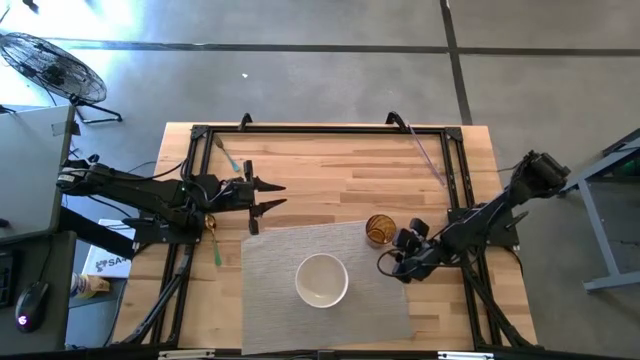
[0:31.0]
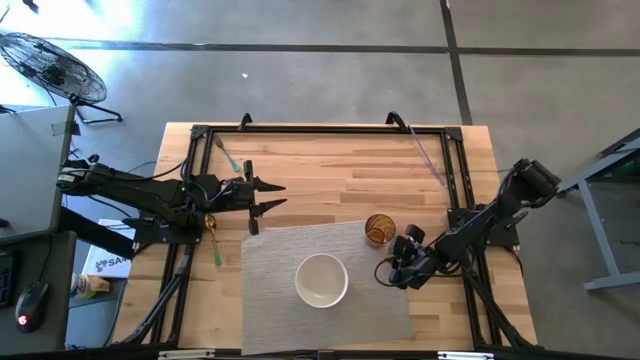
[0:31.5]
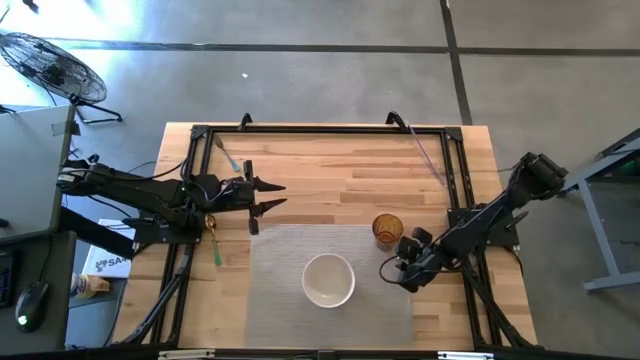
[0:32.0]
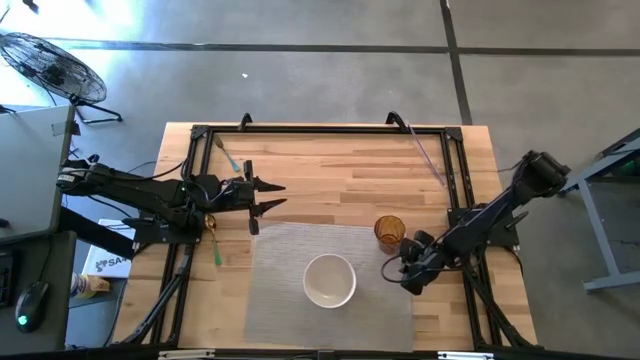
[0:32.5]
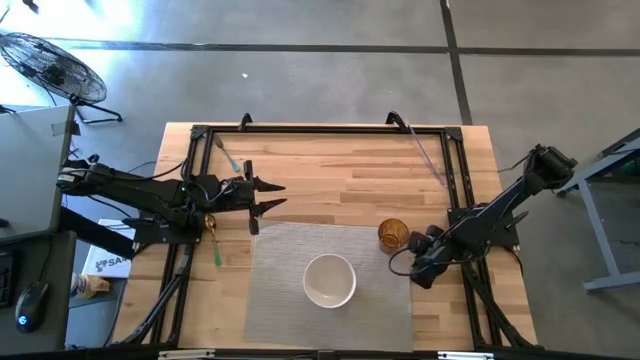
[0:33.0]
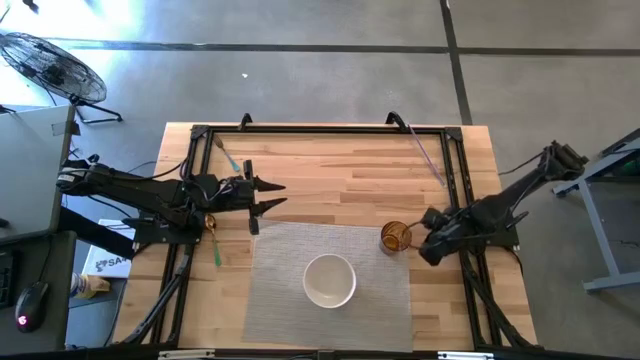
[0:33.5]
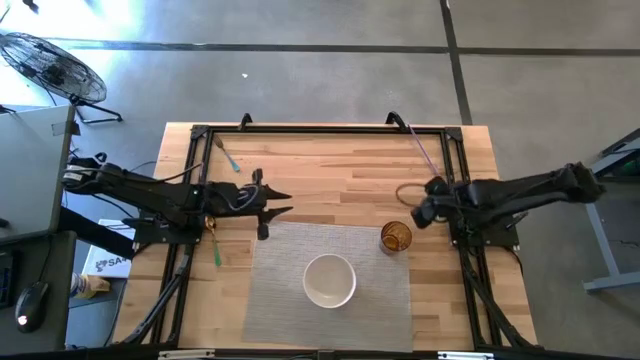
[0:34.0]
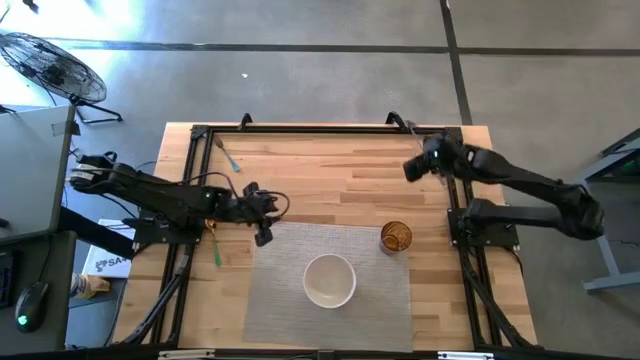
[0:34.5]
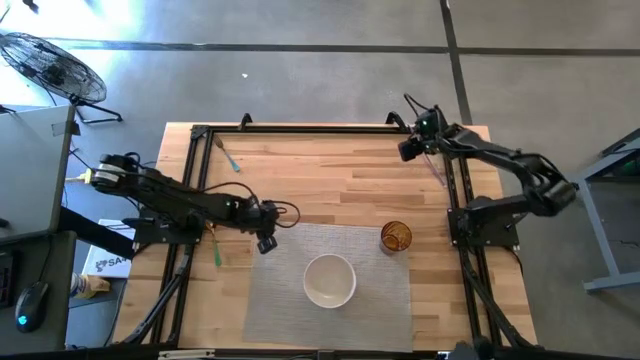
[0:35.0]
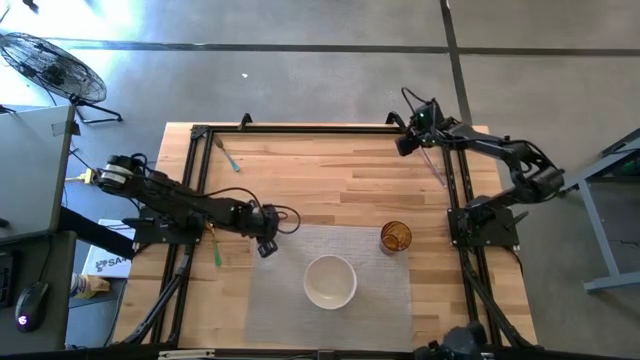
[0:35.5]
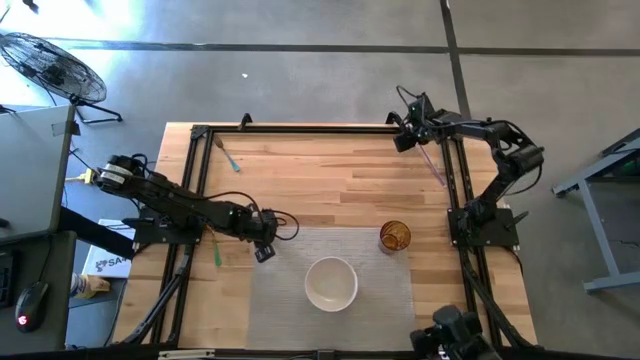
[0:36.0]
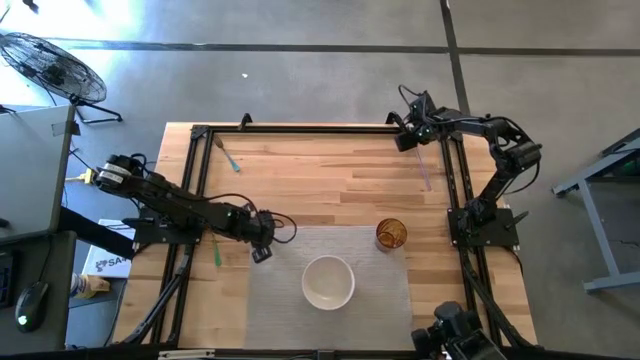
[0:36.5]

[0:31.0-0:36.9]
Task: Pick & Place Utensil
Adjust the gray mat

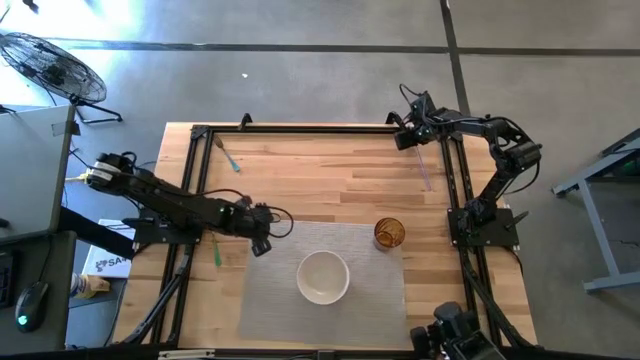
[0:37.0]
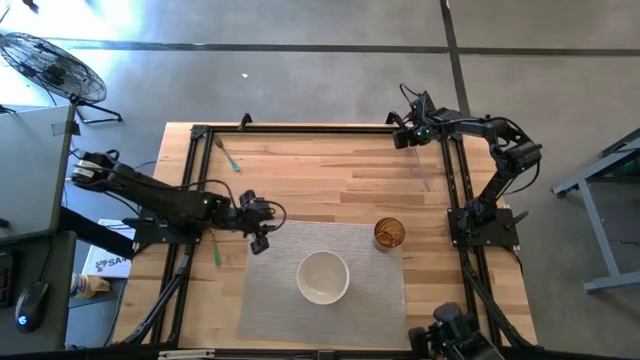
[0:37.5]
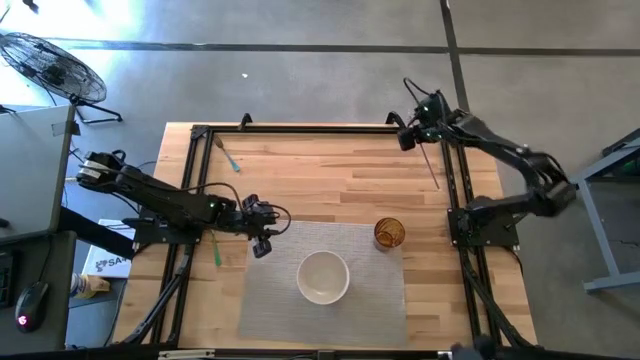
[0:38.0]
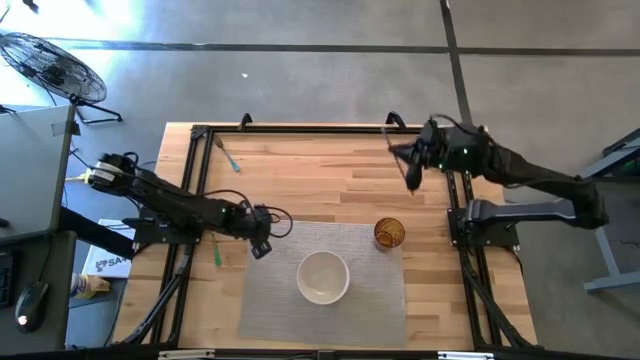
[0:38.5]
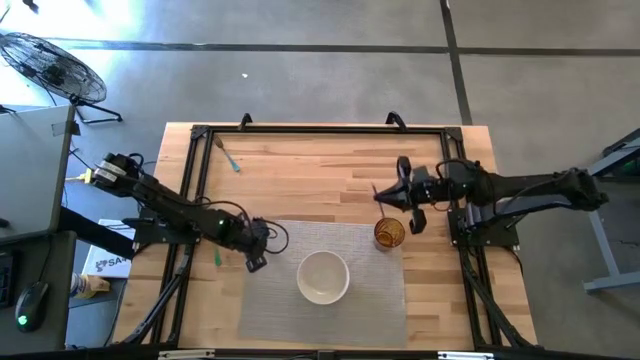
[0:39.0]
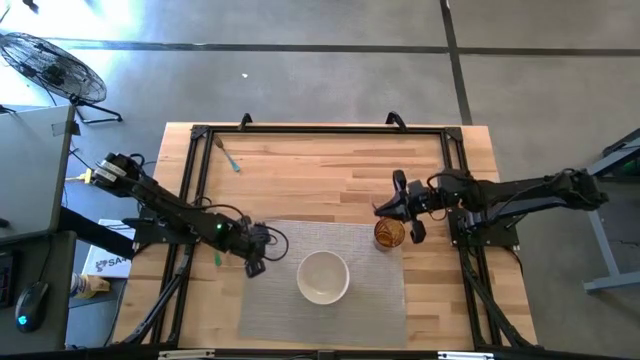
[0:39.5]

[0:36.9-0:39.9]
Put the purple straw into the brown cup on the gray mat

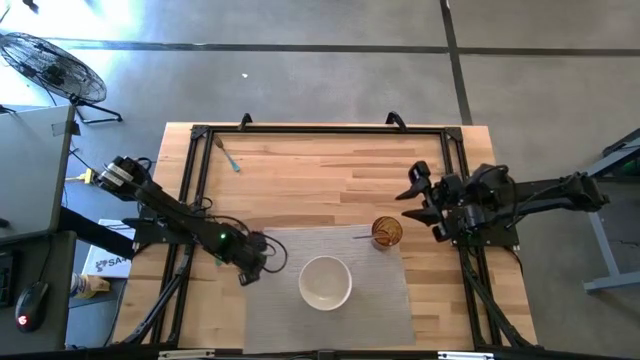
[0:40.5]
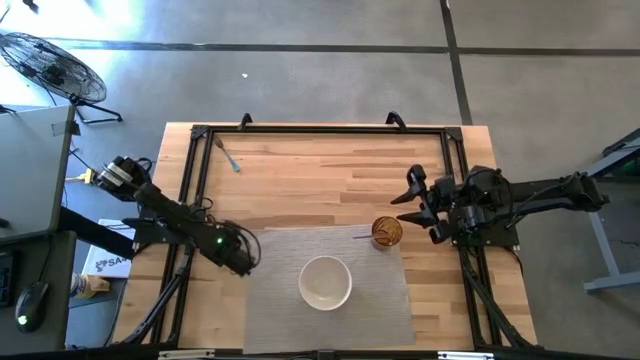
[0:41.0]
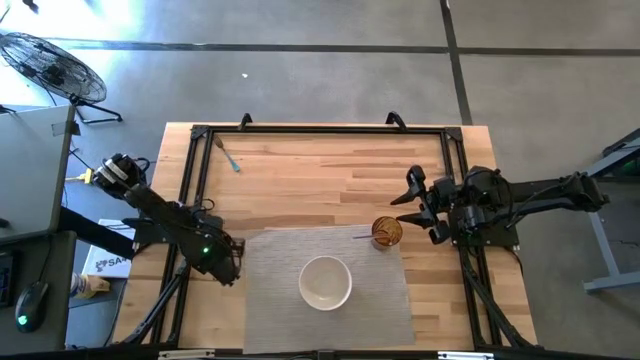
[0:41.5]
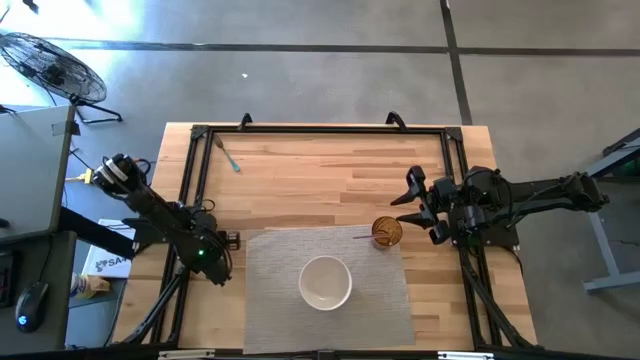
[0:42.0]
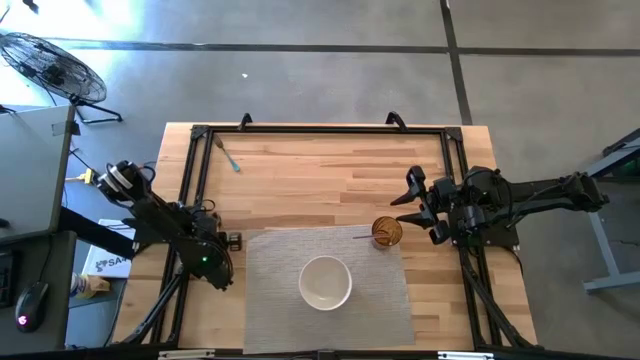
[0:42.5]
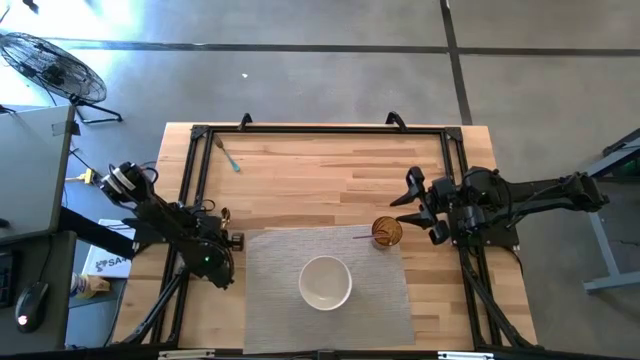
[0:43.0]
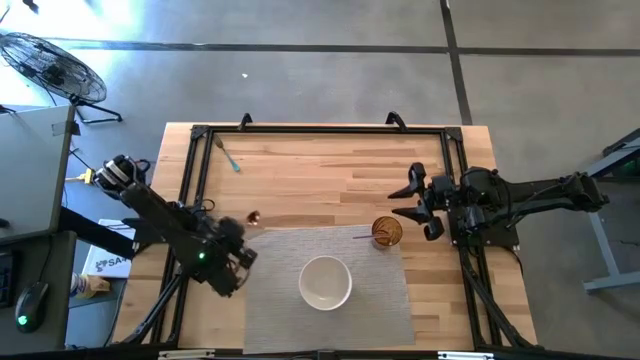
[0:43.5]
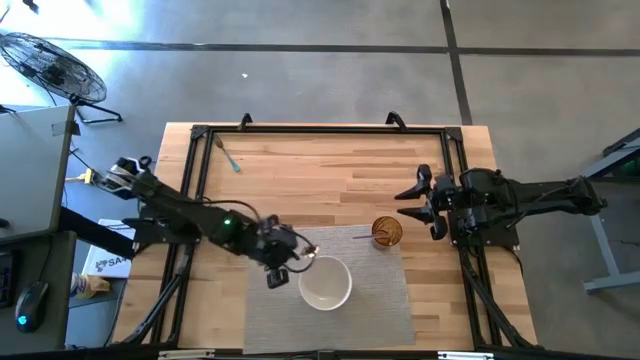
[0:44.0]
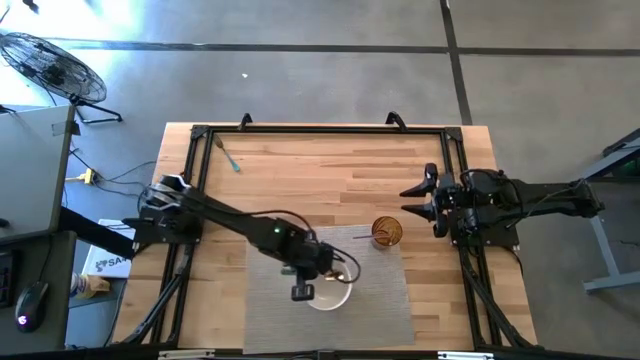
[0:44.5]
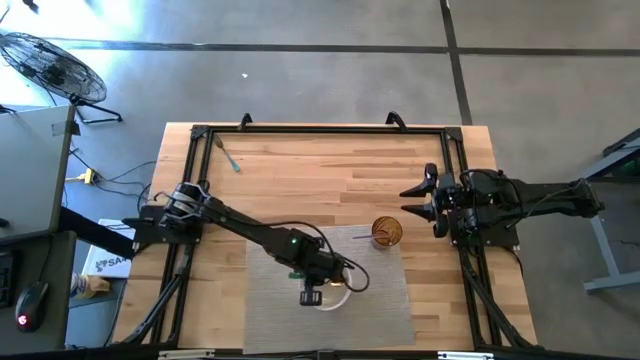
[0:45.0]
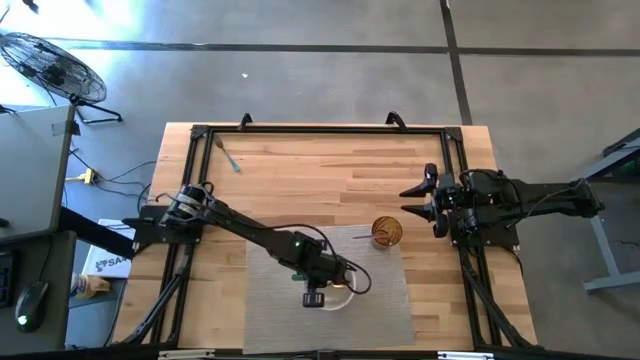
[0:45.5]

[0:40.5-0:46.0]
Put the green spoon into the white bowl on the gray mat

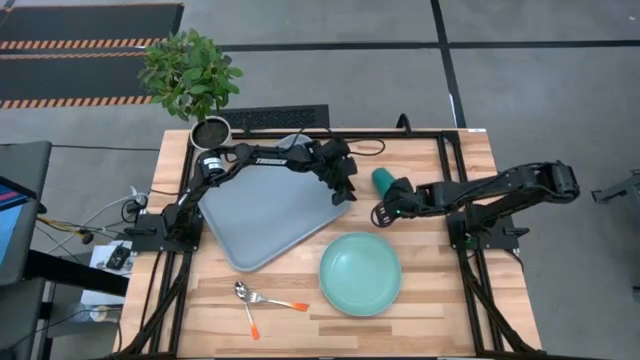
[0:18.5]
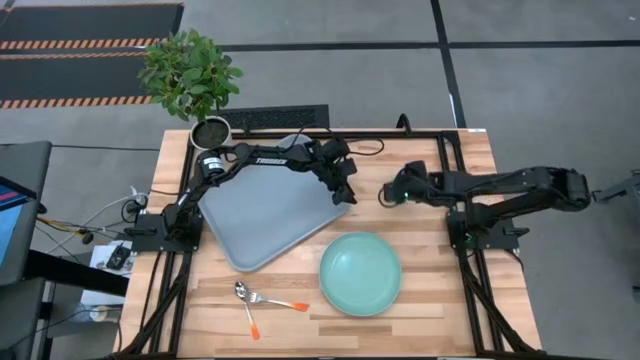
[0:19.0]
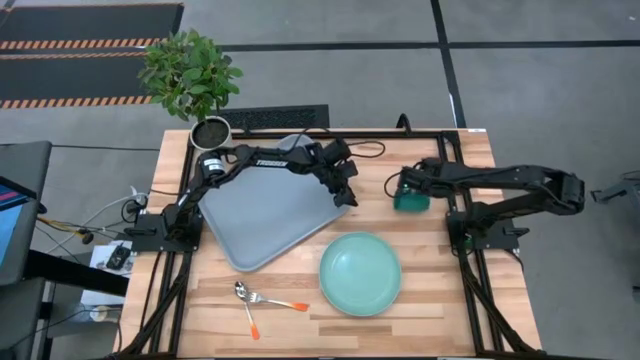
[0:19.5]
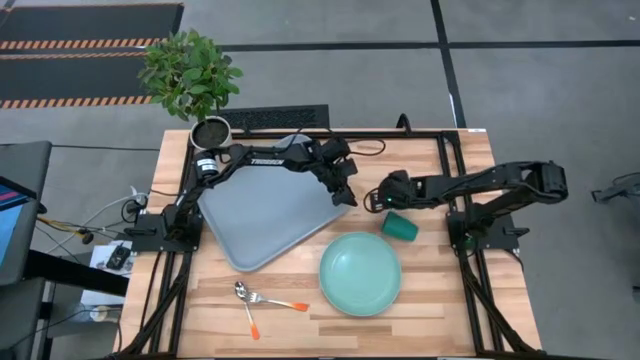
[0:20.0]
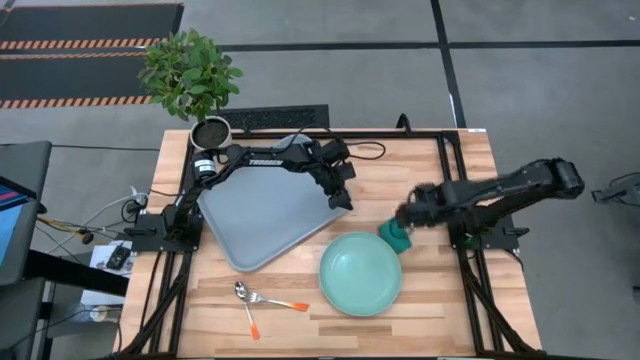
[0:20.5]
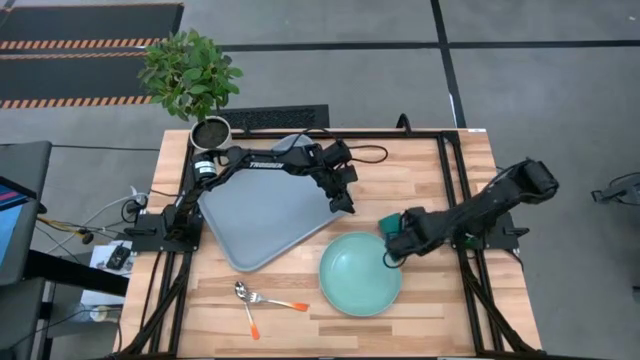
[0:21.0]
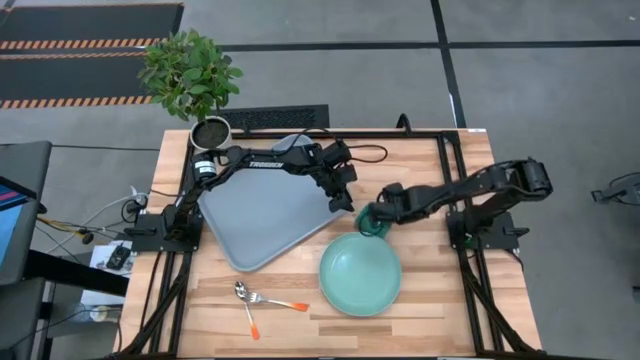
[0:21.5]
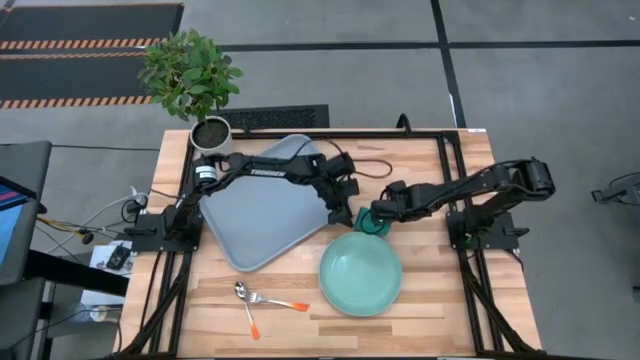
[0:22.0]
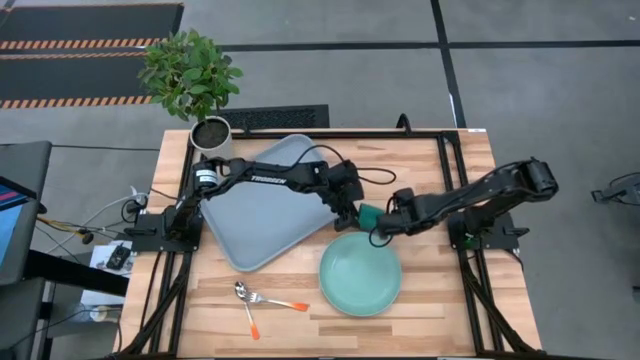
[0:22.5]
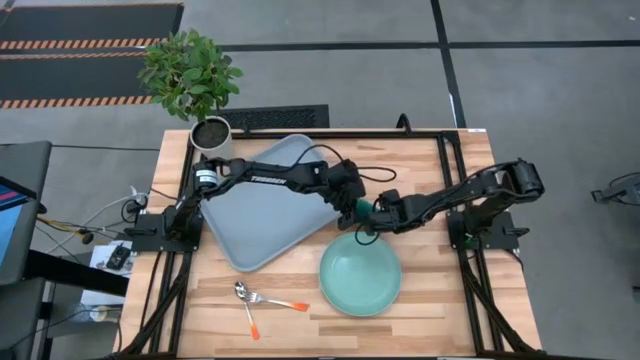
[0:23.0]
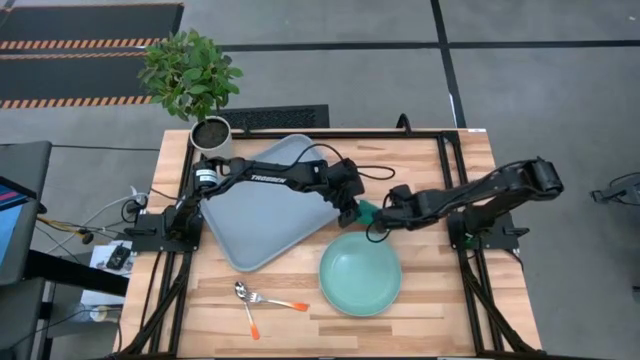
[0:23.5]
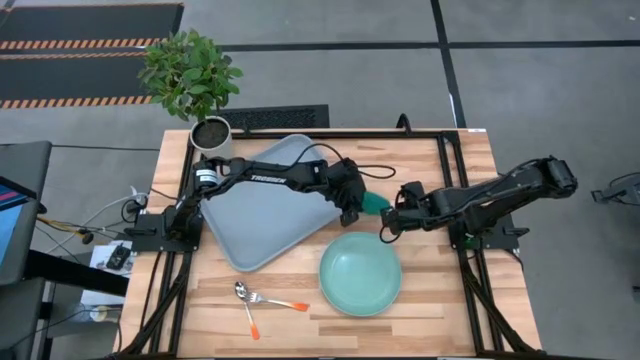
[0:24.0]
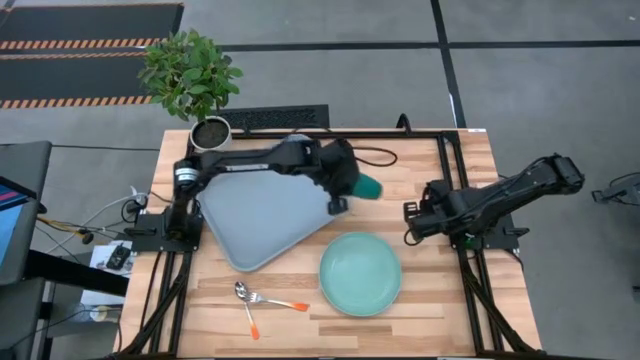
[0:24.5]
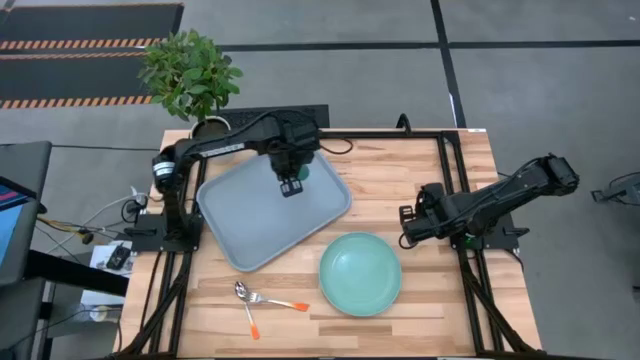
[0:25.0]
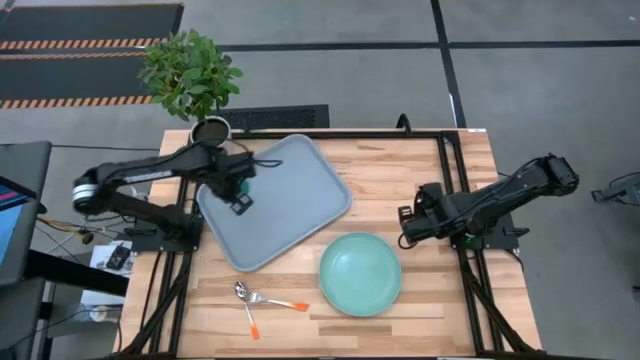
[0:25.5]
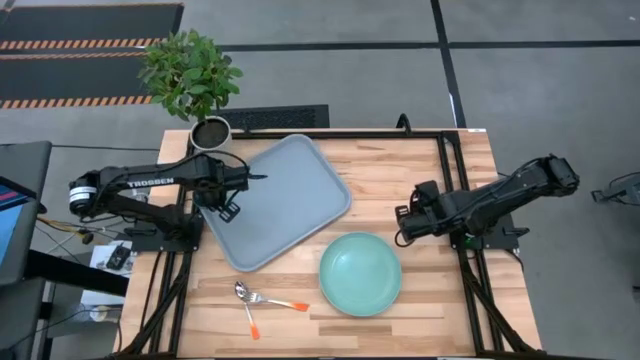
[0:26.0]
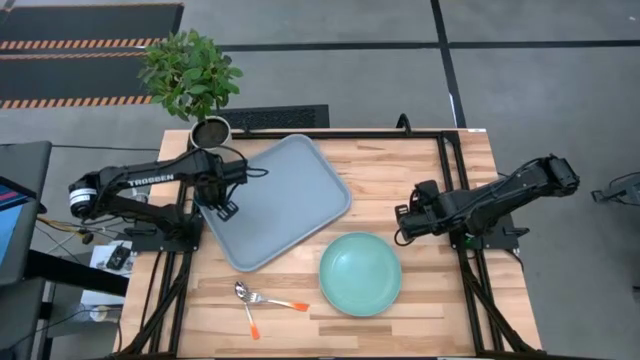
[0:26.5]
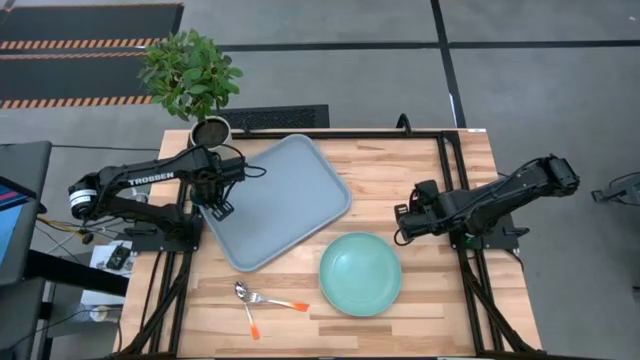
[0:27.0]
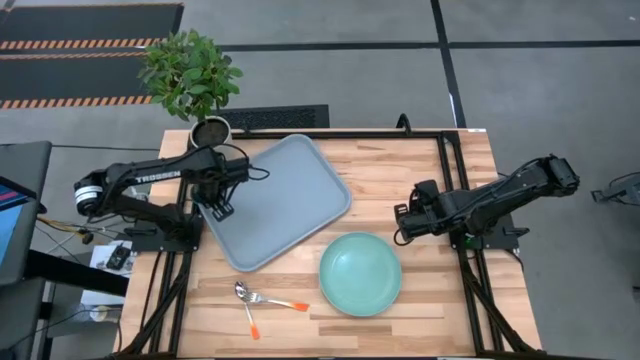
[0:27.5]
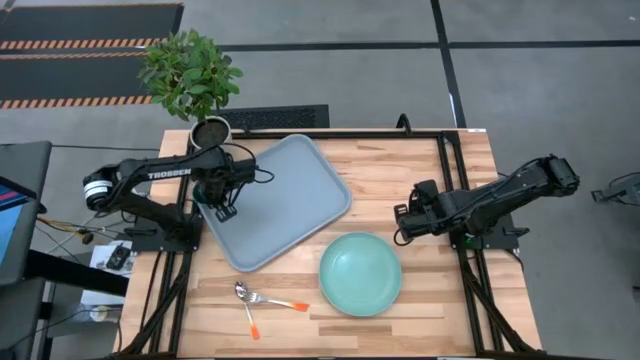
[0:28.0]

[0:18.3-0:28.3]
Task: Pick and place plate/cup/fork/spoon on tray
Put the green cup on the gray serving tray
